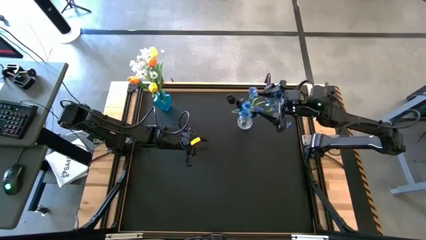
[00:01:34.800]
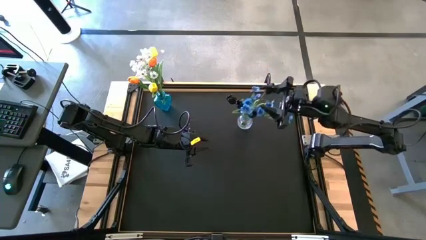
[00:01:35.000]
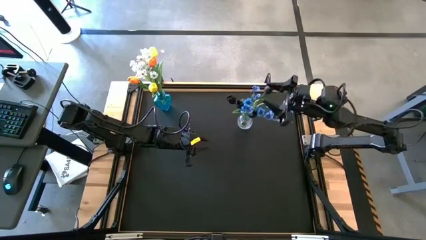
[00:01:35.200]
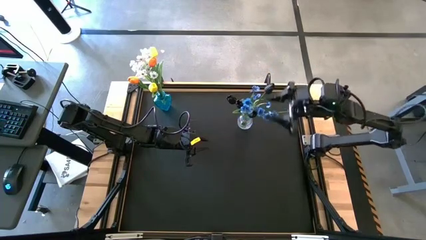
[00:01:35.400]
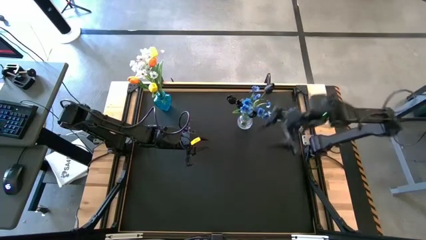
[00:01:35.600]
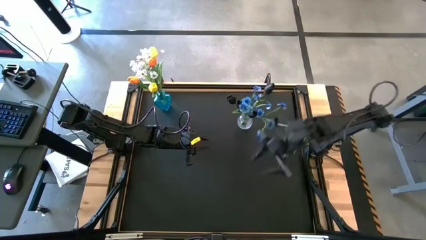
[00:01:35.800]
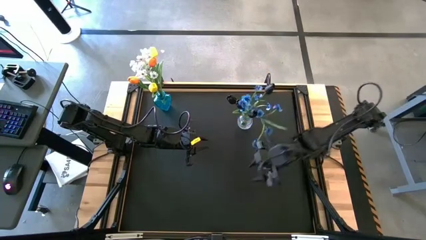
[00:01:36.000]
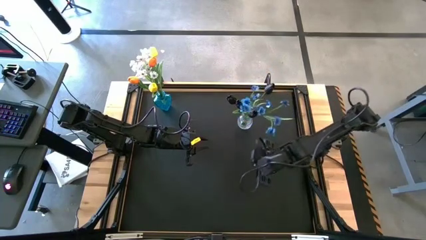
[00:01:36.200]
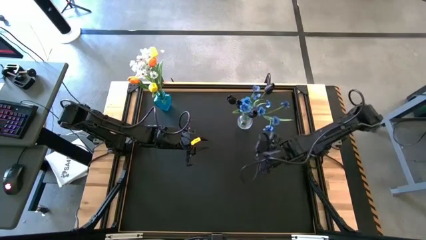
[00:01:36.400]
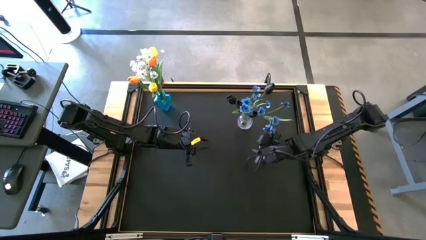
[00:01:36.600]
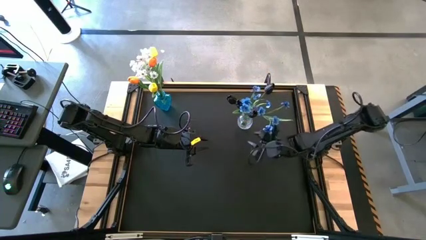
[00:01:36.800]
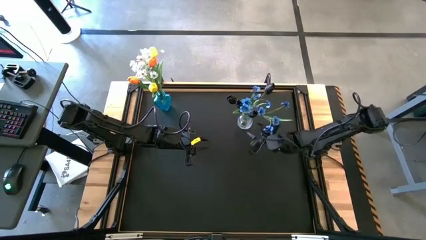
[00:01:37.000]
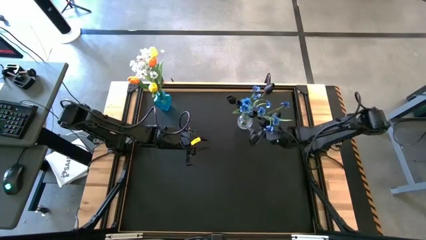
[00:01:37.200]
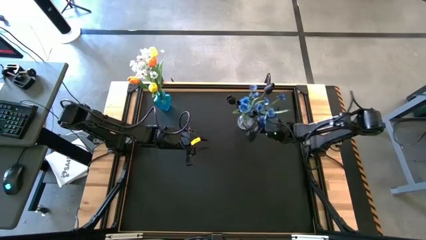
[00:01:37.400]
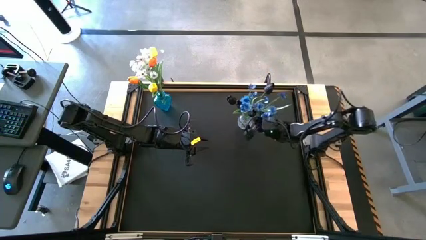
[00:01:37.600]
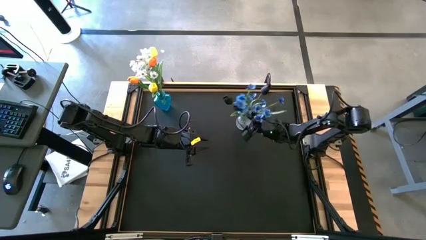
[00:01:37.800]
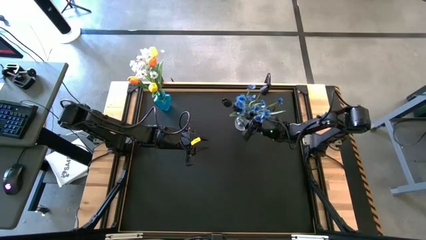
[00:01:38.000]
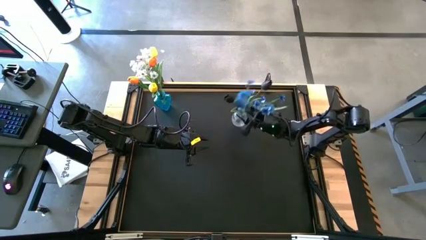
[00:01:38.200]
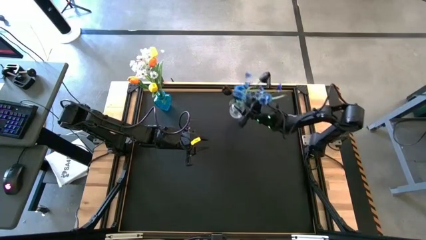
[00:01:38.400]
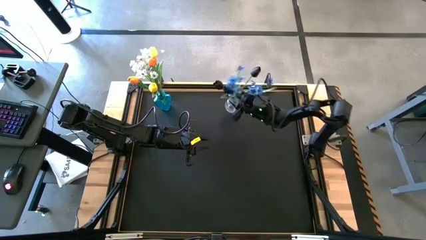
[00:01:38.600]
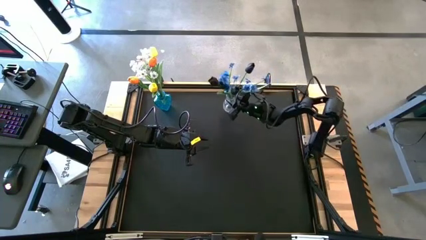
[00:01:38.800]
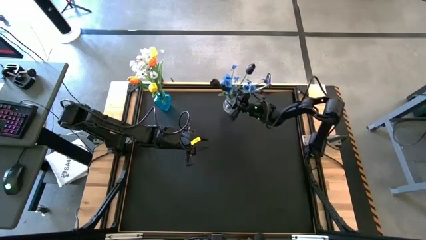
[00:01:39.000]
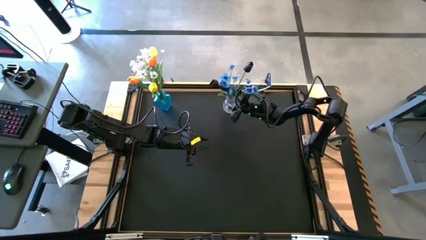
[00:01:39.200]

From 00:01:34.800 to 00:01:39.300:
Task: Sort flowers into vase by color
Adjust the transparent vase

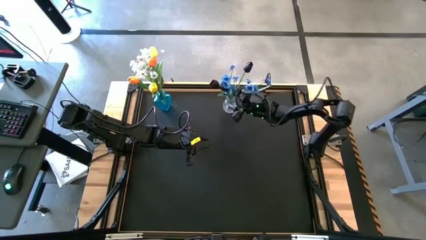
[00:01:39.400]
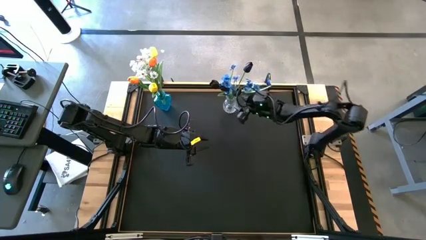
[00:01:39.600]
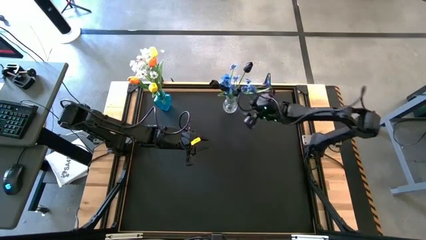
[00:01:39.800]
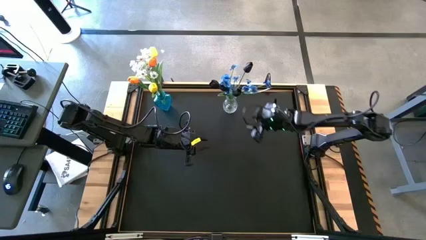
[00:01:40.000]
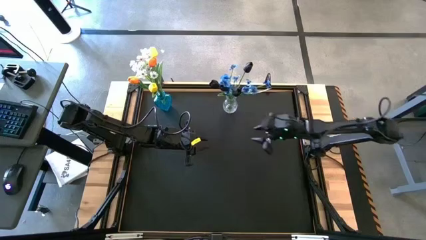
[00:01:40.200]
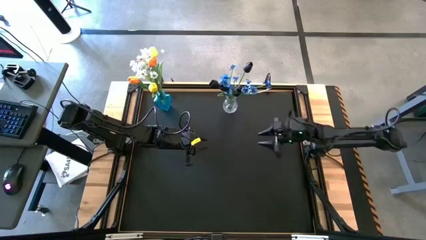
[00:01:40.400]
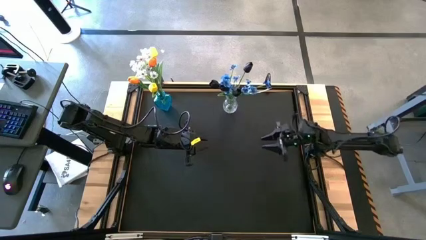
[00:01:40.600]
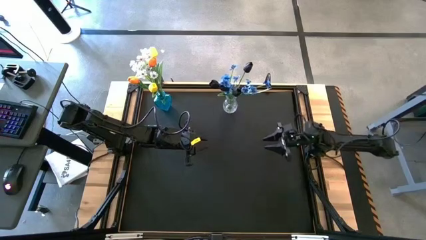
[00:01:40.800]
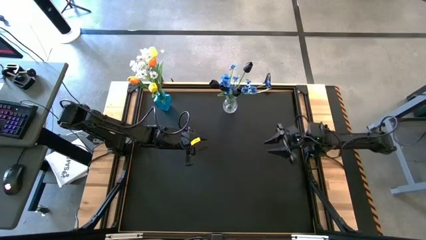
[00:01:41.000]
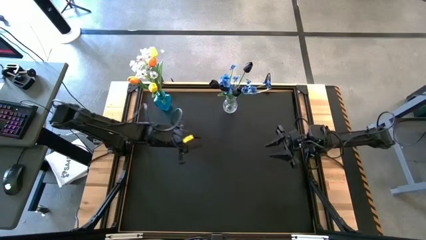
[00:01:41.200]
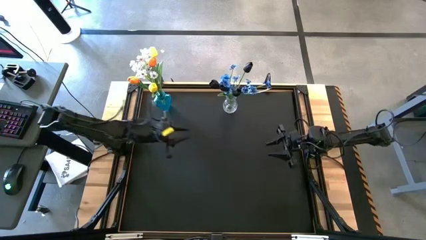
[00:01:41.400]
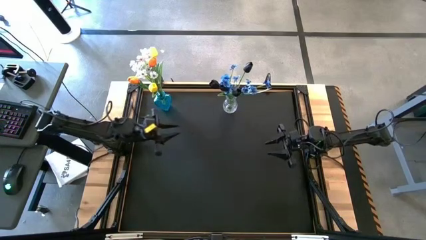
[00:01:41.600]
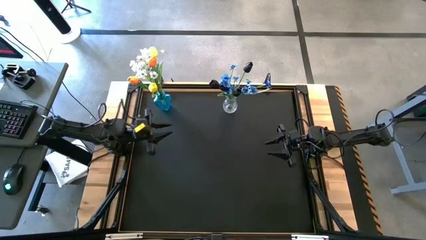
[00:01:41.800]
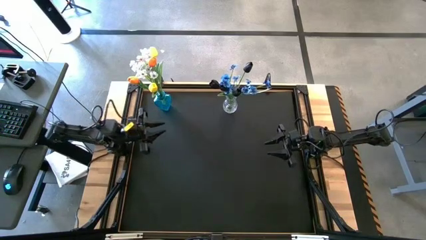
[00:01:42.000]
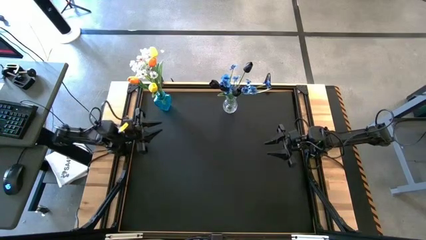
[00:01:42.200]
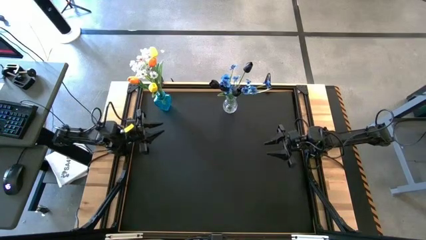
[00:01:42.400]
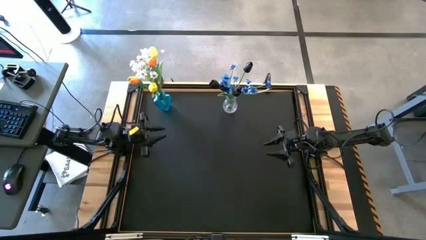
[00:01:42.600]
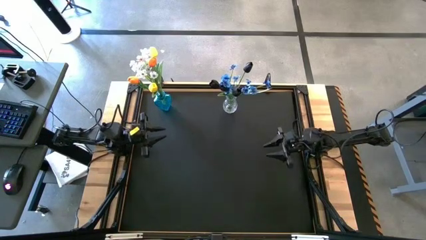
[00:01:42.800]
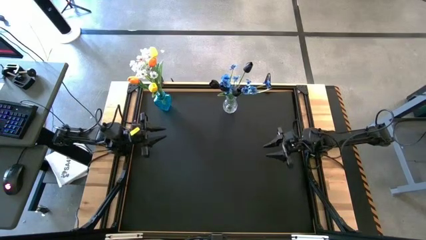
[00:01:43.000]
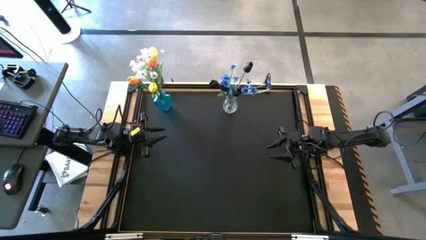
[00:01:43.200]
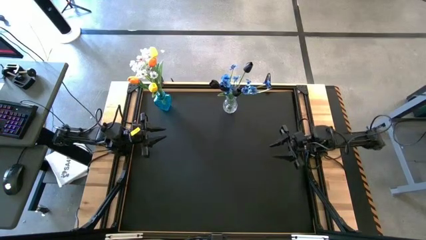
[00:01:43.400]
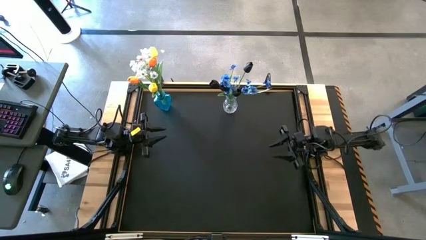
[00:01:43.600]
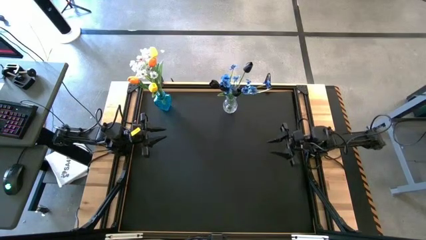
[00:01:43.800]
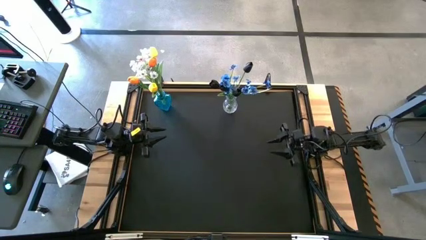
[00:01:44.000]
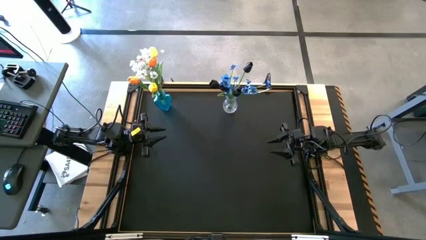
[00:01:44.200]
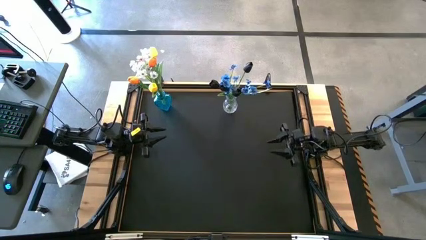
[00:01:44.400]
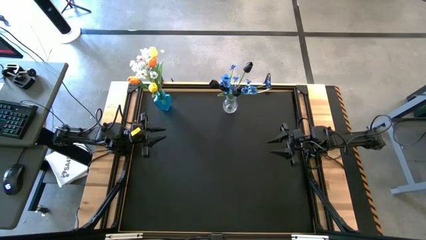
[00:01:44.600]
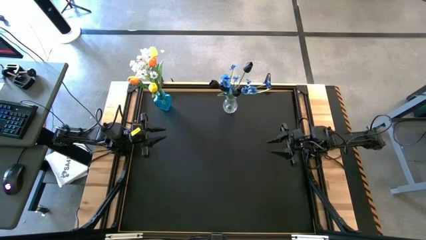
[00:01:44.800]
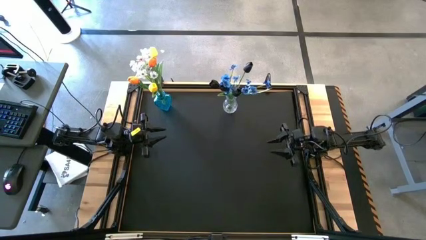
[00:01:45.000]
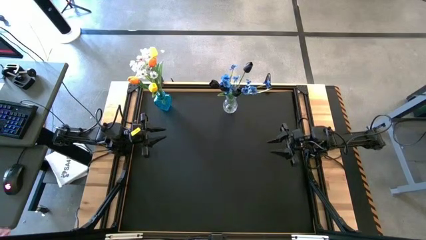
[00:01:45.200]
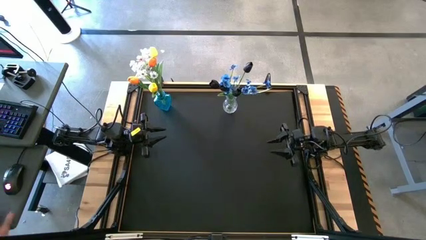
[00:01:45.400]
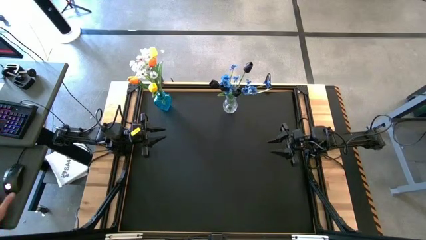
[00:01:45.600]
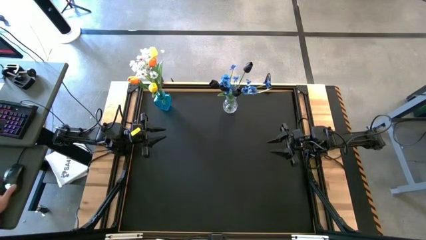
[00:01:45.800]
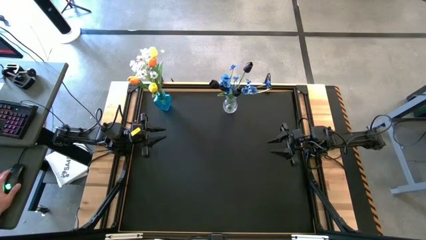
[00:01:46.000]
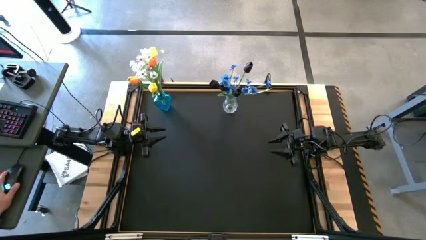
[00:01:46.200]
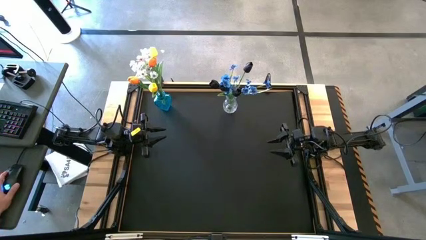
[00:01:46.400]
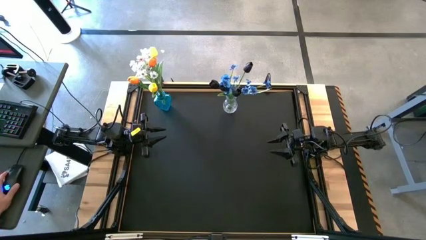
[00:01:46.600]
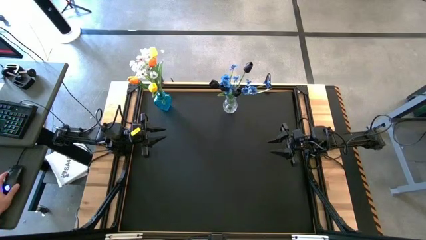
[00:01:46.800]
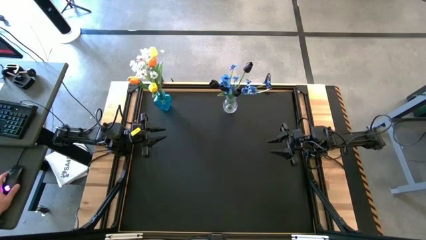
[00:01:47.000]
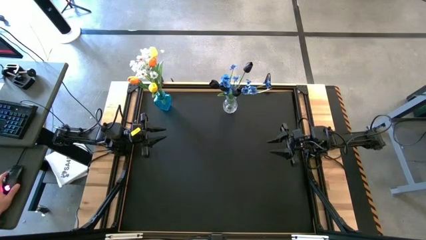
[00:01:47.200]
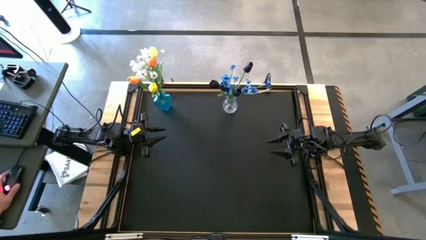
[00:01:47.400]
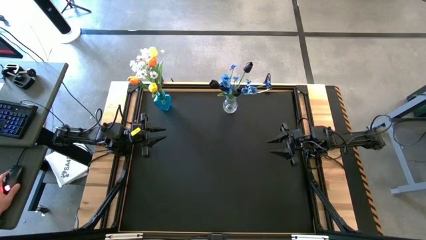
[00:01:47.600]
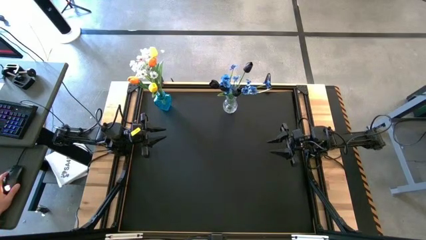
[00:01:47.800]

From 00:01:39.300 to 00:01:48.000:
Return to Home Position
